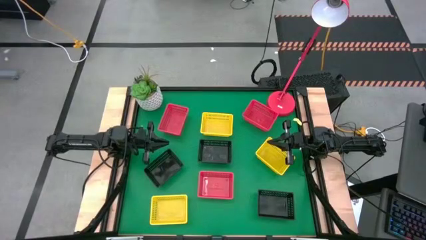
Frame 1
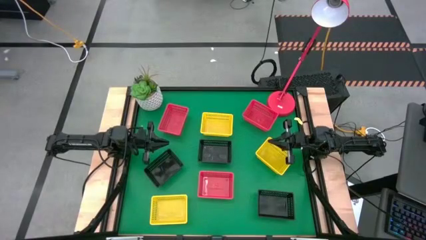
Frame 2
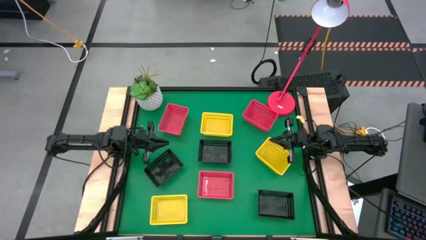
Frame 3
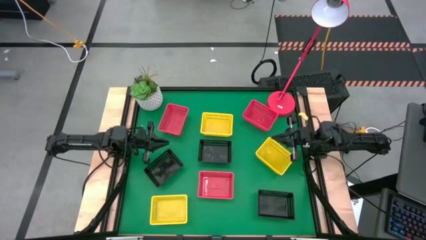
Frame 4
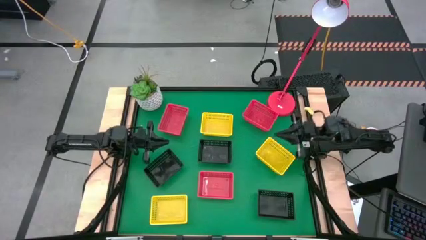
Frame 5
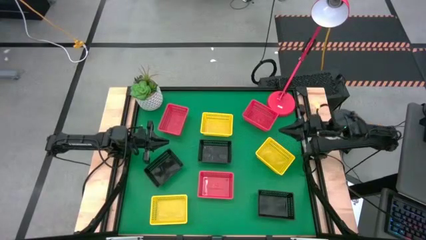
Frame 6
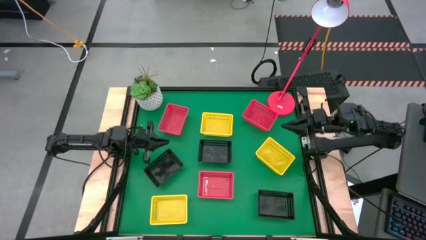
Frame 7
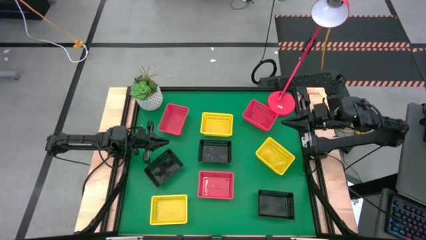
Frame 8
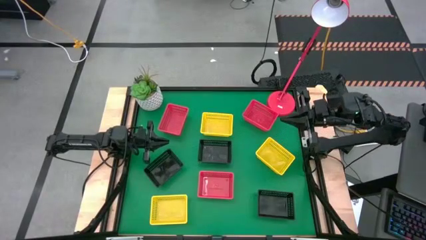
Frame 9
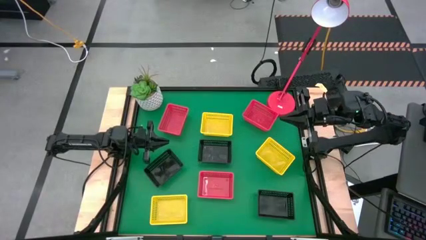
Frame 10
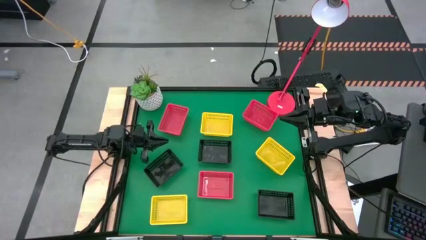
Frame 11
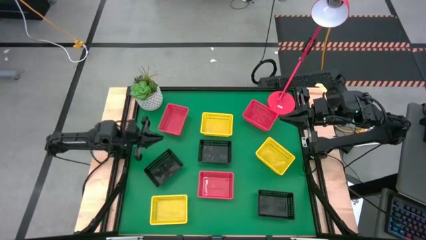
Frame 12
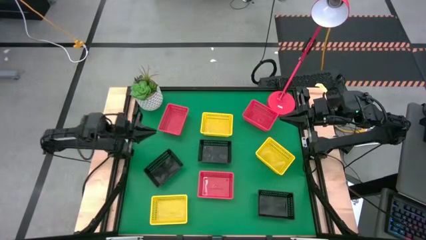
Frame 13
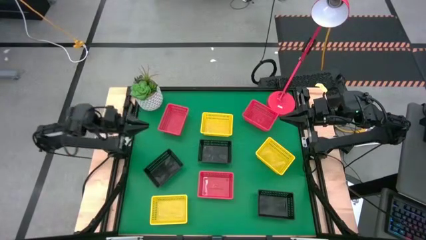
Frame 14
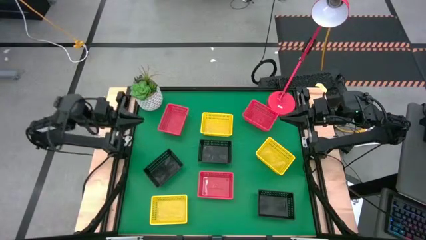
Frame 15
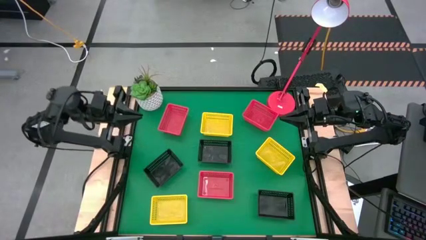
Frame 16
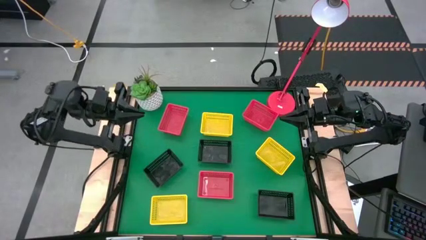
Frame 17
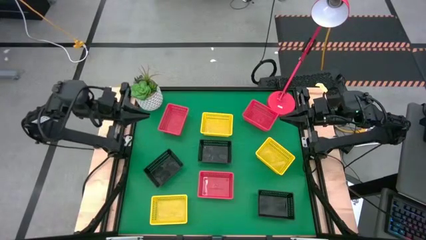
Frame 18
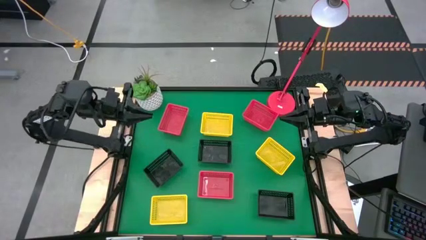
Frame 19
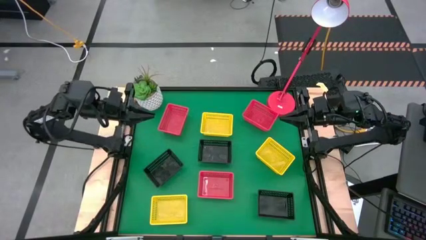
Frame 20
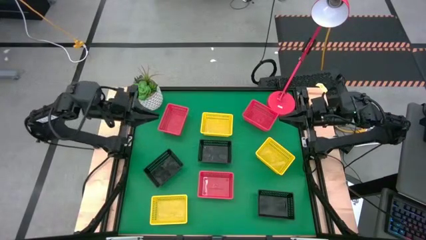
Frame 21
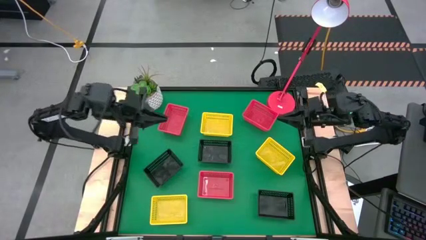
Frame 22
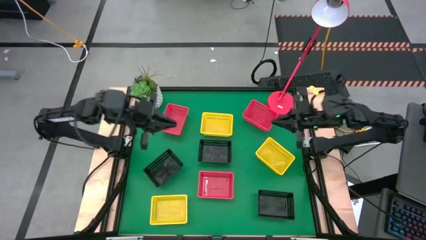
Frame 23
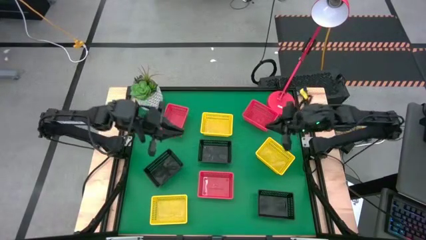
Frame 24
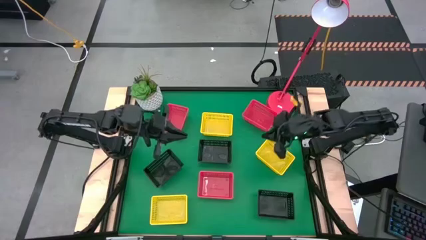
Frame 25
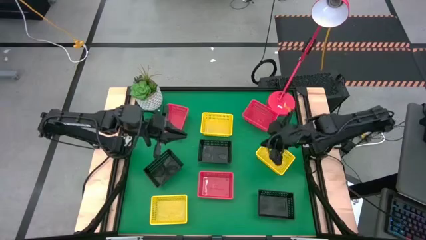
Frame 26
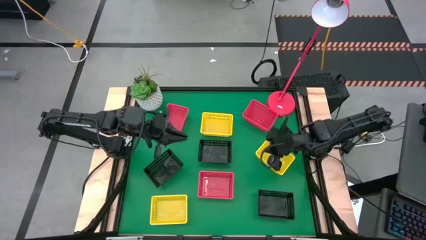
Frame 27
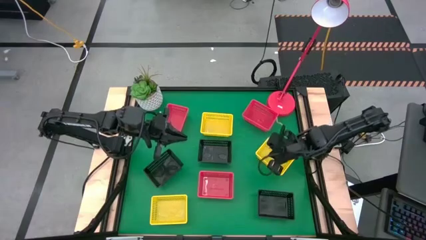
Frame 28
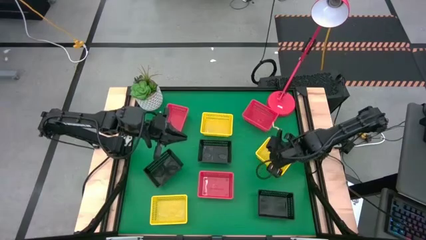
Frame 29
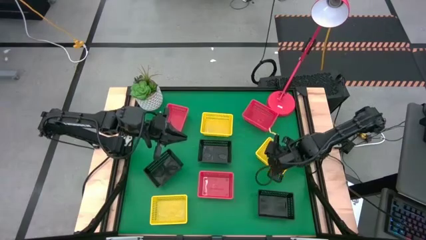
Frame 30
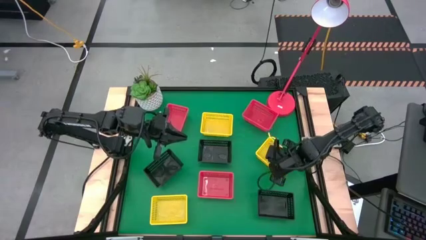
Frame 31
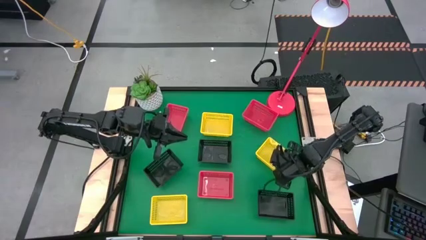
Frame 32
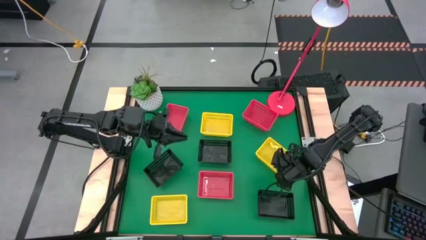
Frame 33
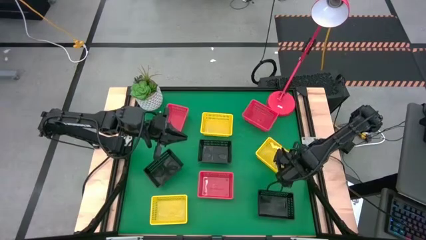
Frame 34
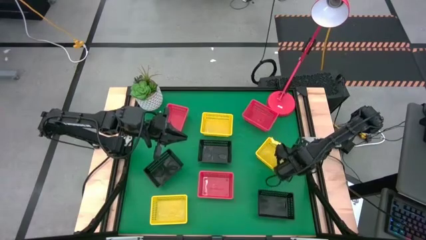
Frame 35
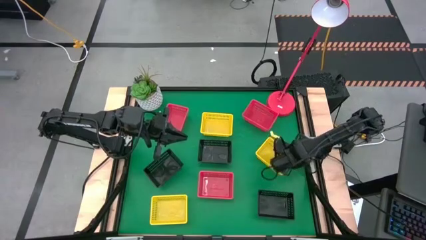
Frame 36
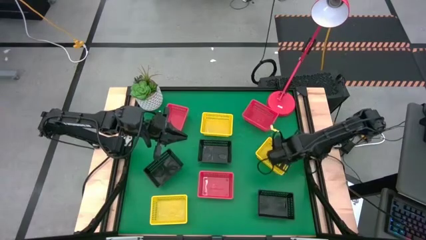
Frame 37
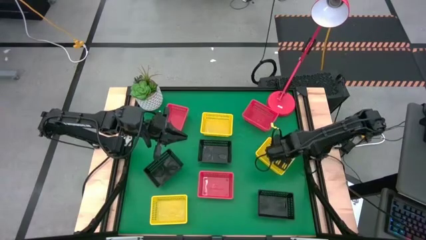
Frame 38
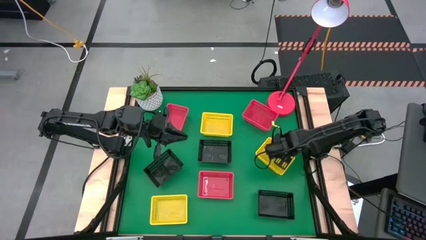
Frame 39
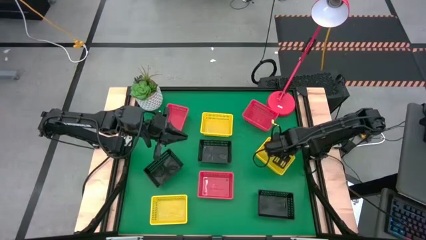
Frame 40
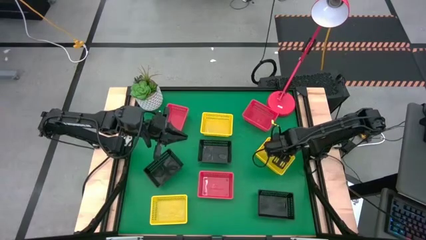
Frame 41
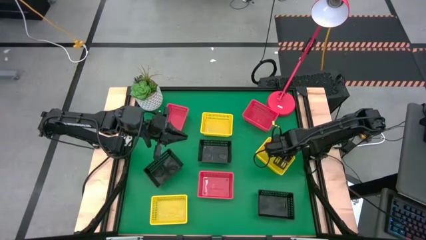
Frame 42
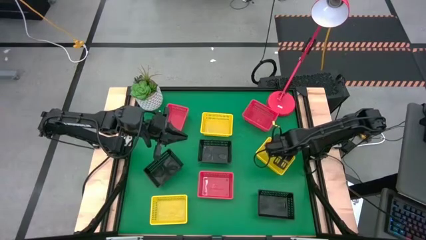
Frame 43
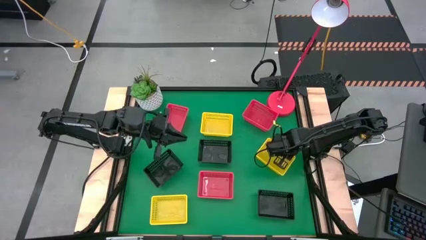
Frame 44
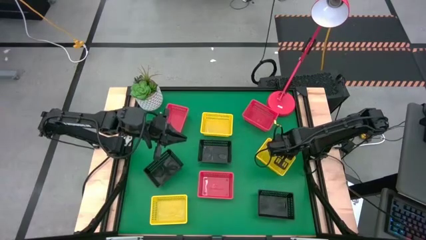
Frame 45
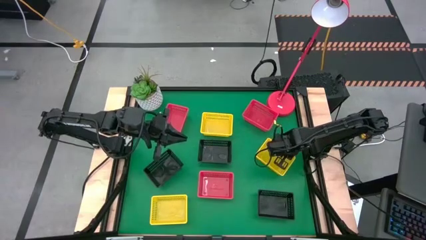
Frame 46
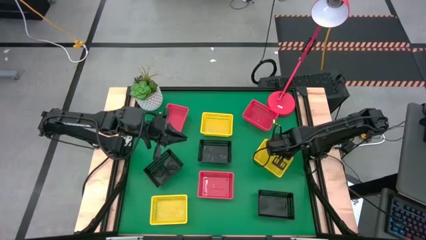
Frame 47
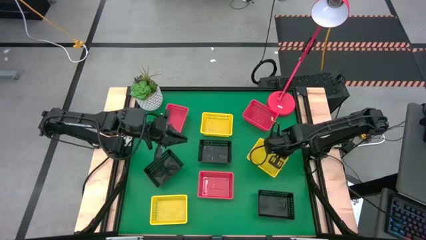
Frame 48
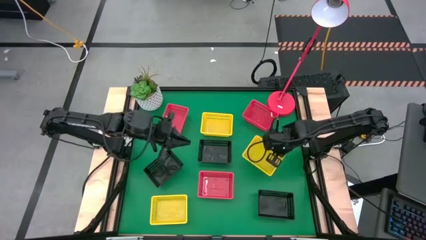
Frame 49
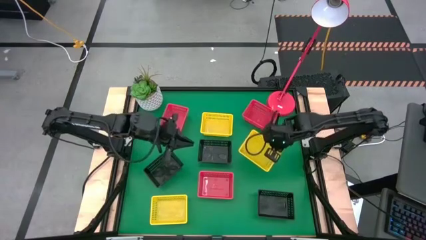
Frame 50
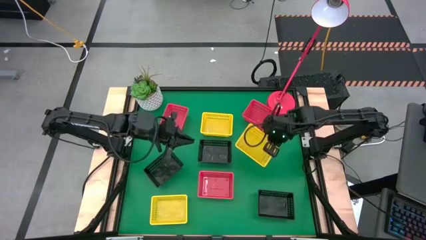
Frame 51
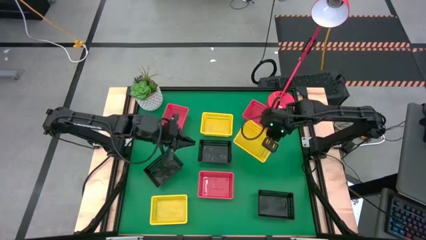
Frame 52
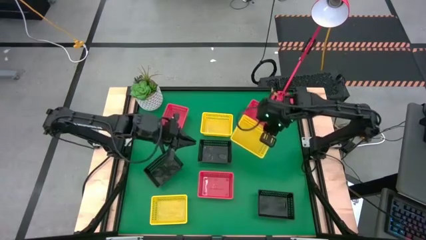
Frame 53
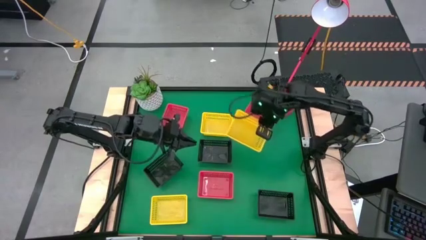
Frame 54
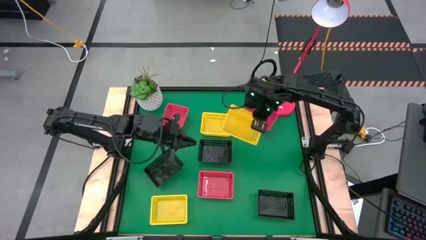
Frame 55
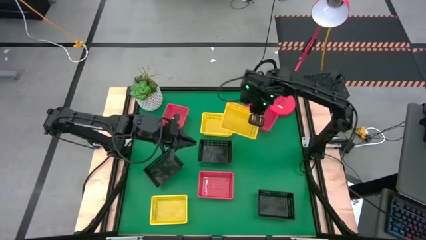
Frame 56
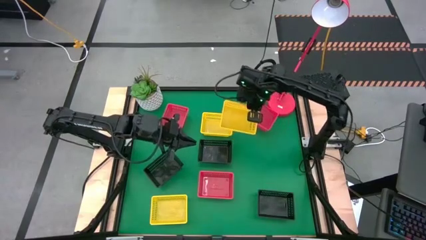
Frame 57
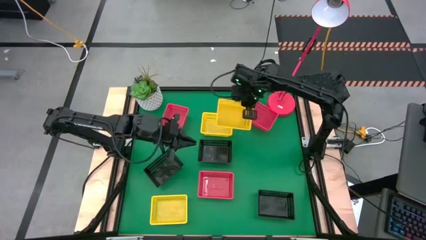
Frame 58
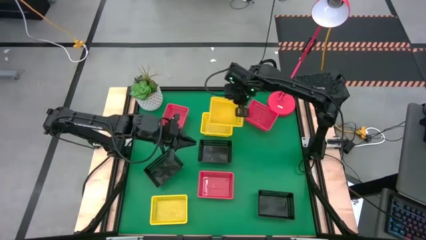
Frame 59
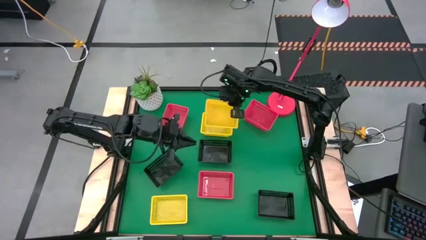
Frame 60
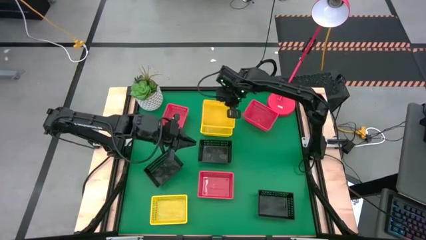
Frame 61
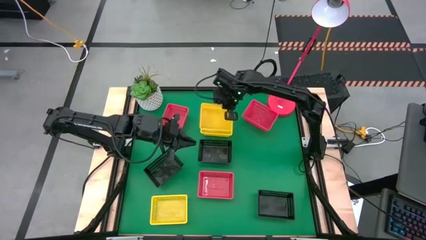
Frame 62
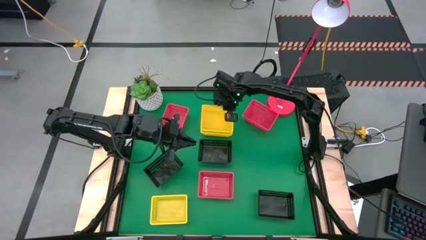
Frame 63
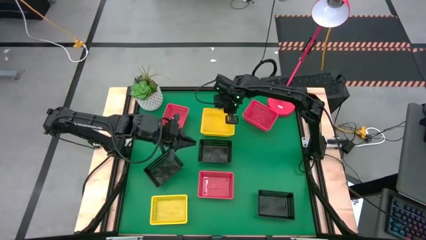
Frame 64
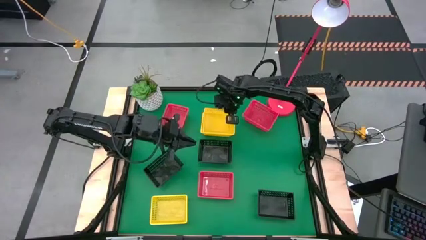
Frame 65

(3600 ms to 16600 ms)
Stack the middle right yellow basket on the top yellow basket

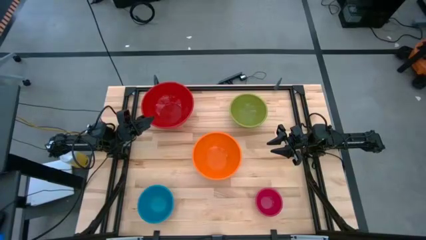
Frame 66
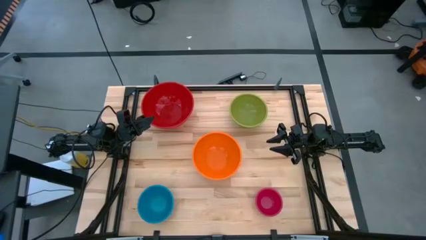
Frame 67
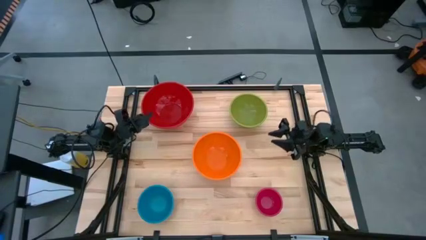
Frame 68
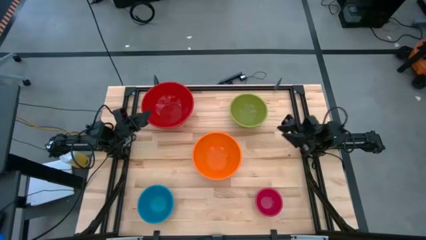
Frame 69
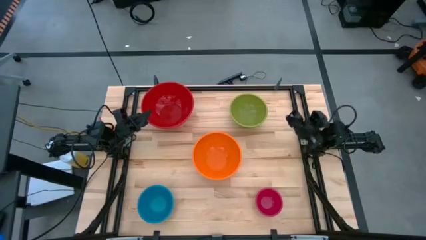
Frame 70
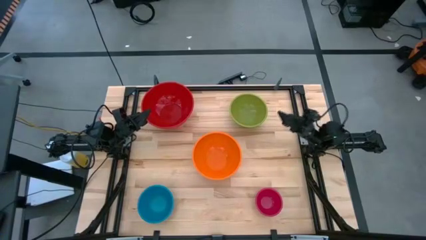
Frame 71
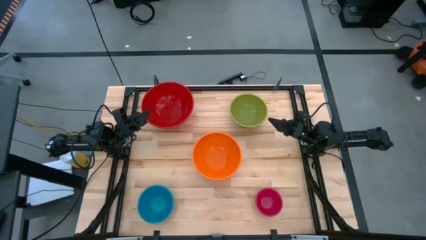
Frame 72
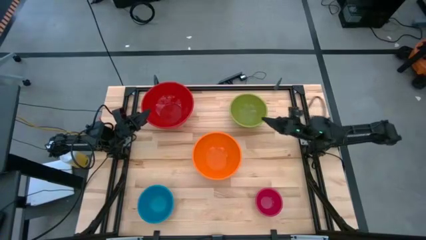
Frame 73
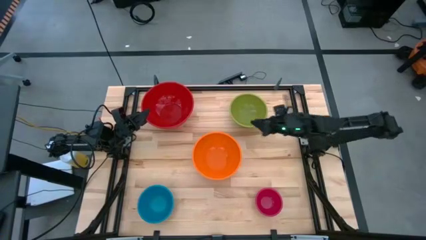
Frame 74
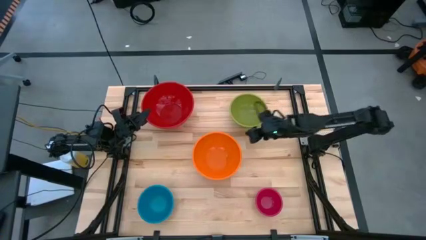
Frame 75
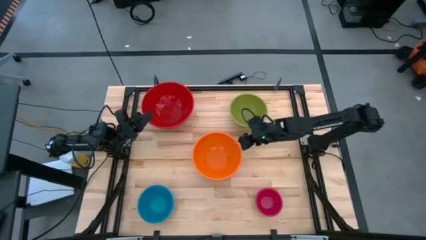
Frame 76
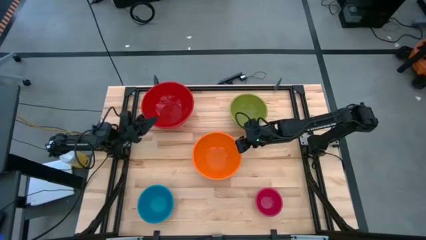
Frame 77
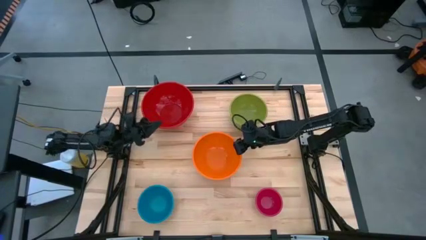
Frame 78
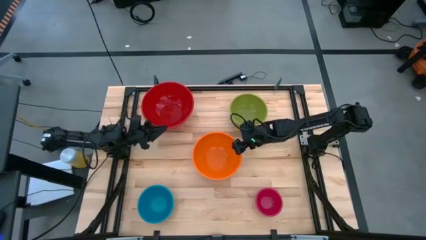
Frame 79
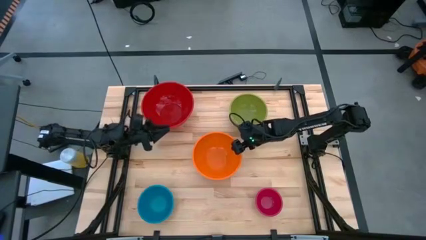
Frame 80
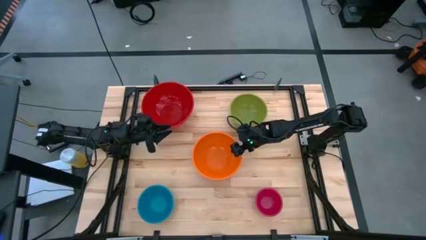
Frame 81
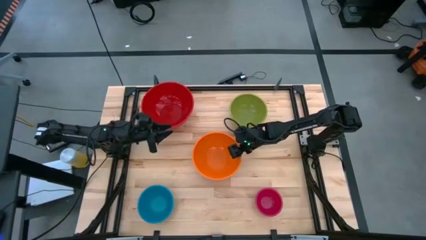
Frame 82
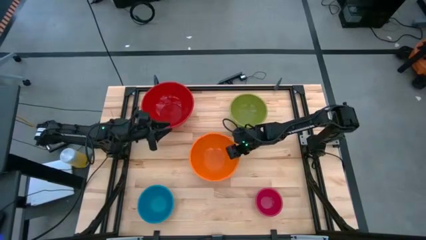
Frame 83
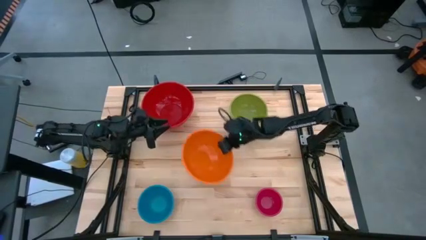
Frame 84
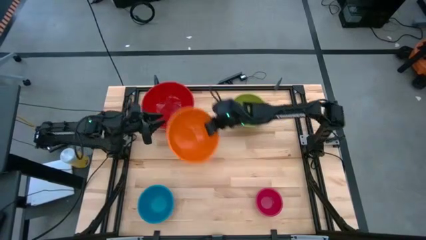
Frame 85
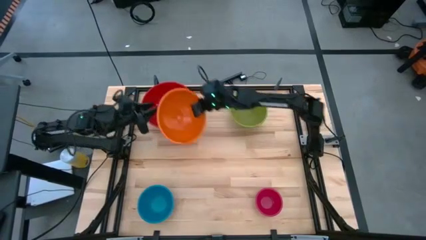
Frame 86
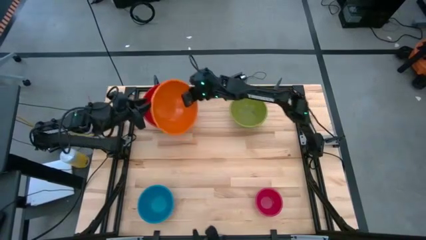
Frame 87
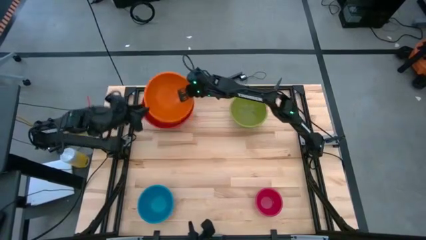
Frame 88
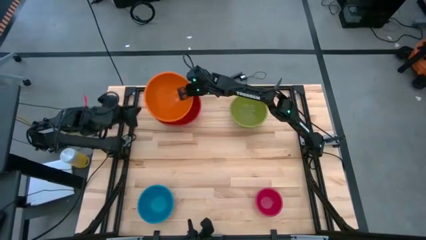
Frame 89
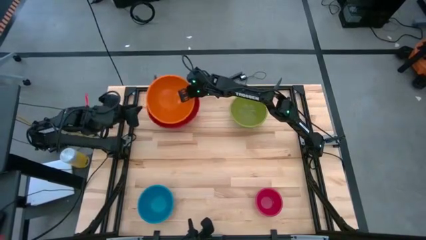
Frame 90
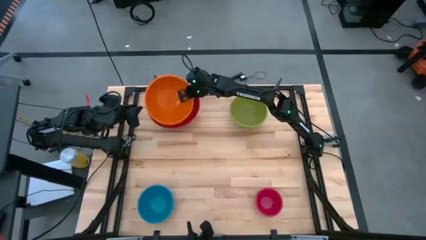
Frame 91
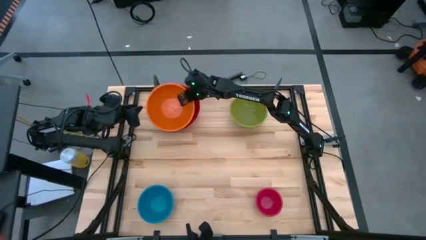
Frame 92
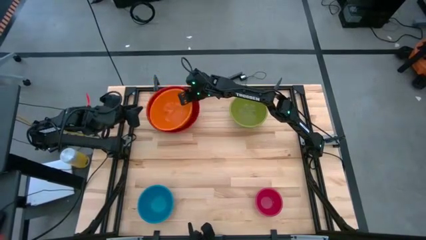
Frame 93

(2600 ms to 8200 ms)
Stack the orange bowl on the red bowl
